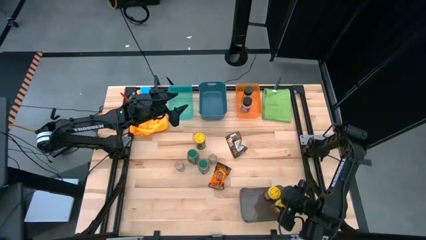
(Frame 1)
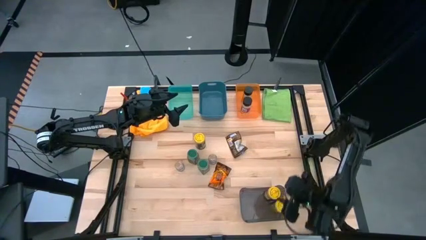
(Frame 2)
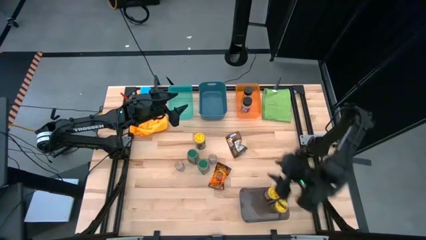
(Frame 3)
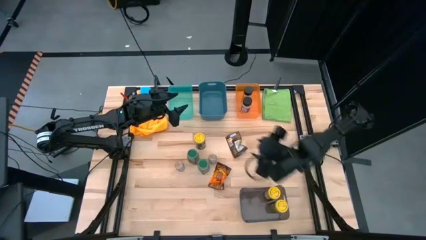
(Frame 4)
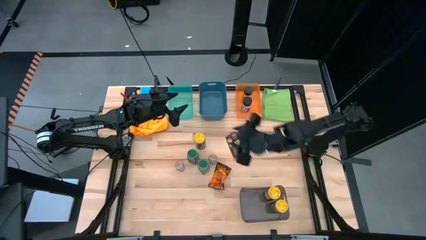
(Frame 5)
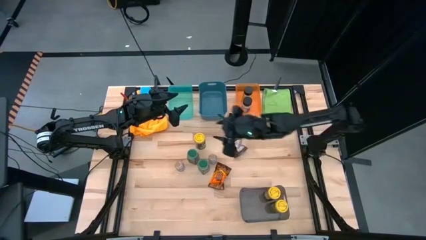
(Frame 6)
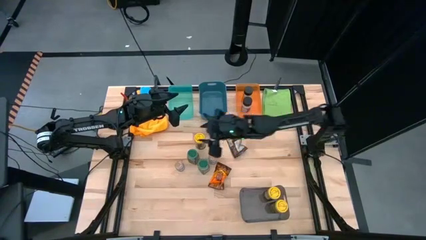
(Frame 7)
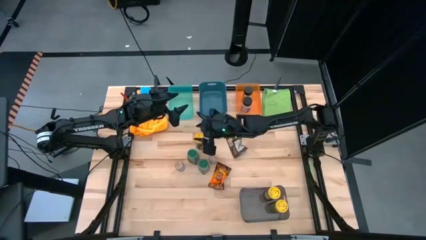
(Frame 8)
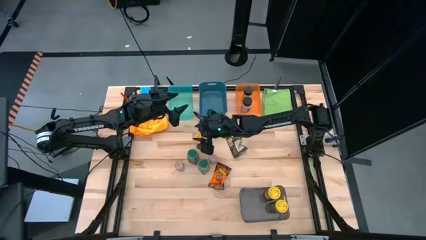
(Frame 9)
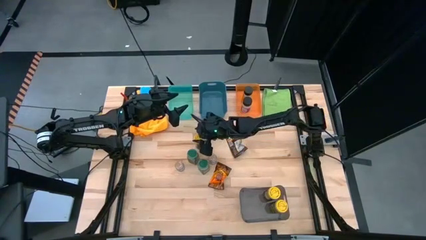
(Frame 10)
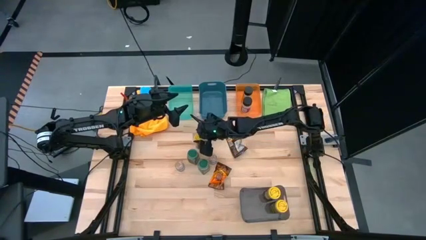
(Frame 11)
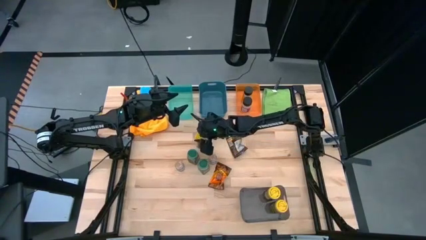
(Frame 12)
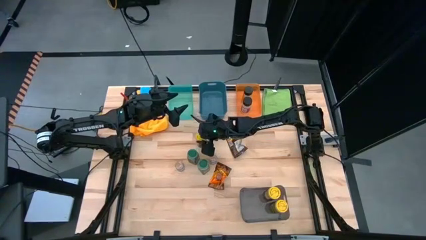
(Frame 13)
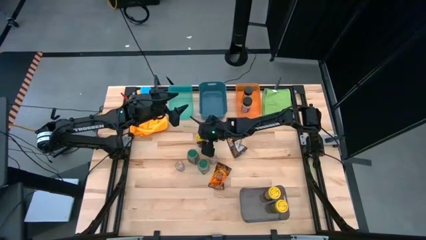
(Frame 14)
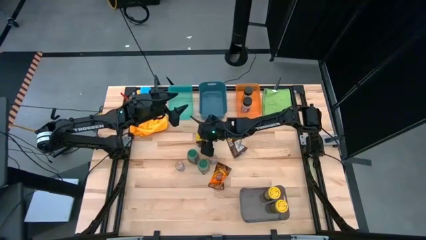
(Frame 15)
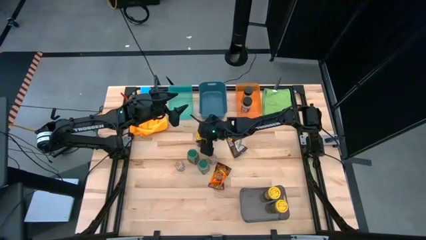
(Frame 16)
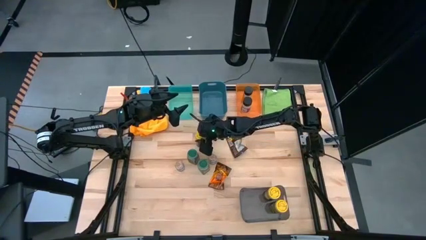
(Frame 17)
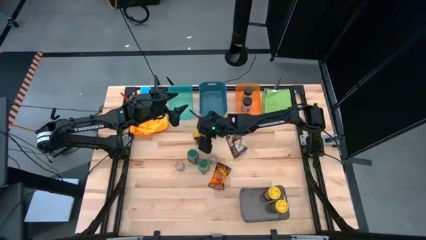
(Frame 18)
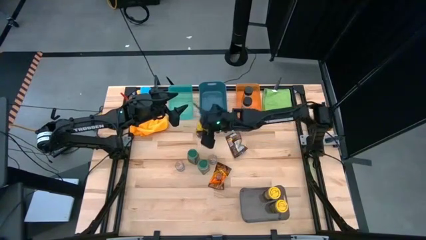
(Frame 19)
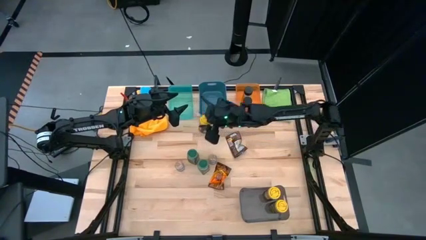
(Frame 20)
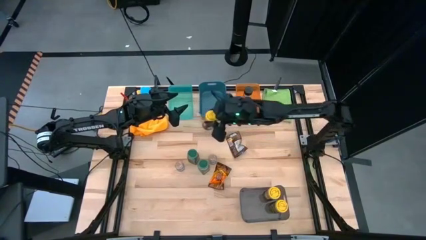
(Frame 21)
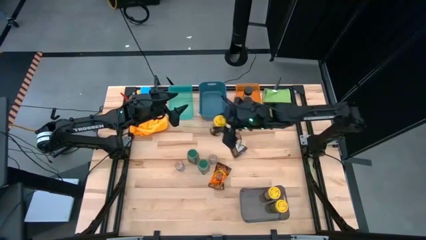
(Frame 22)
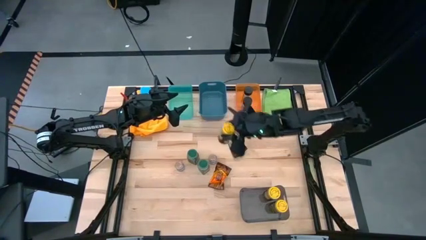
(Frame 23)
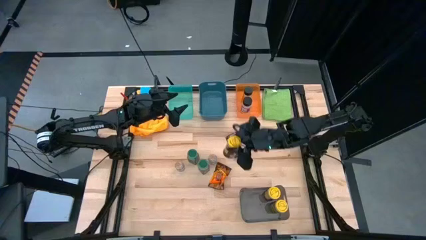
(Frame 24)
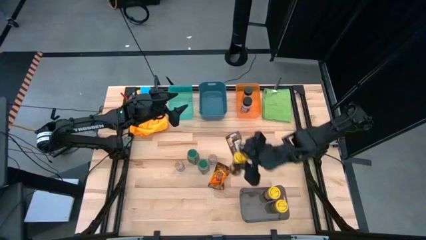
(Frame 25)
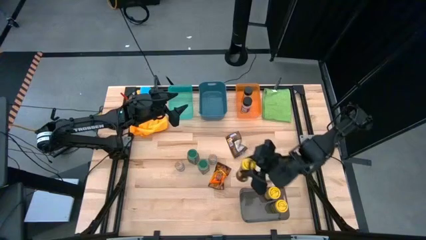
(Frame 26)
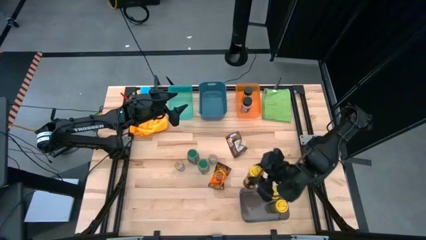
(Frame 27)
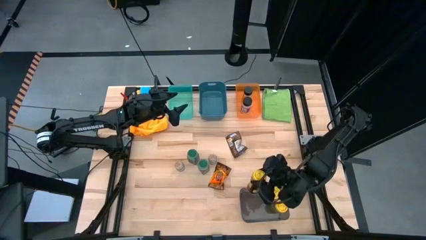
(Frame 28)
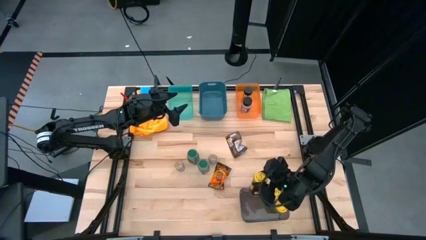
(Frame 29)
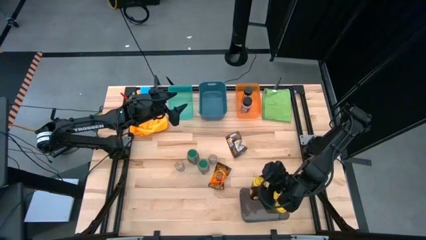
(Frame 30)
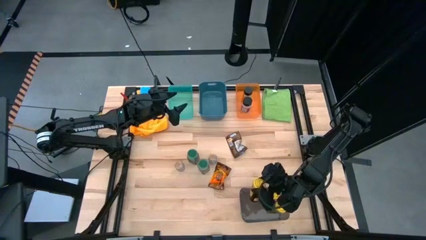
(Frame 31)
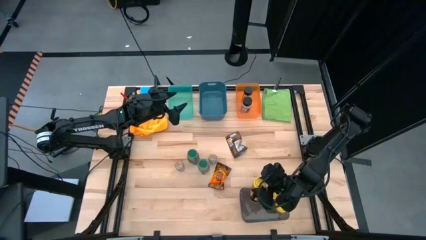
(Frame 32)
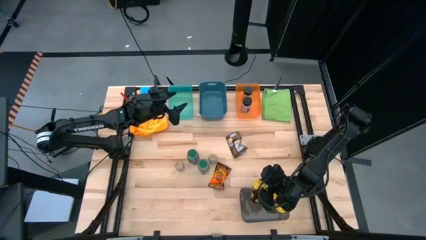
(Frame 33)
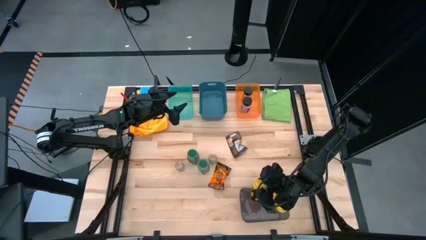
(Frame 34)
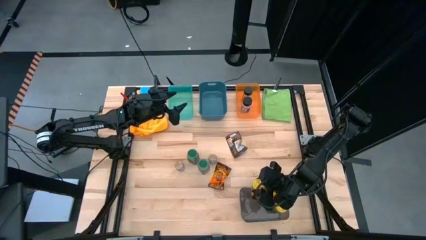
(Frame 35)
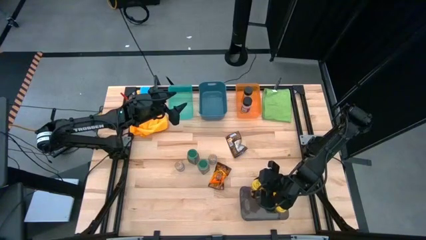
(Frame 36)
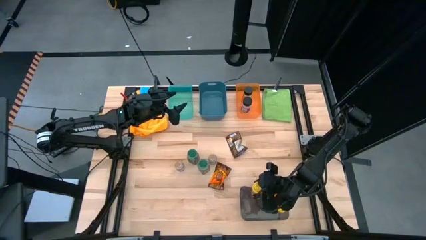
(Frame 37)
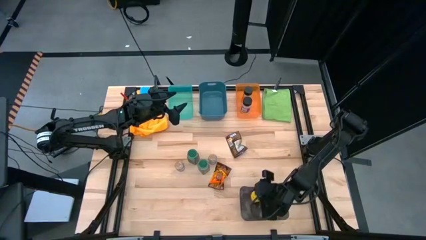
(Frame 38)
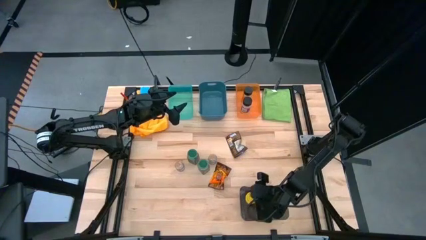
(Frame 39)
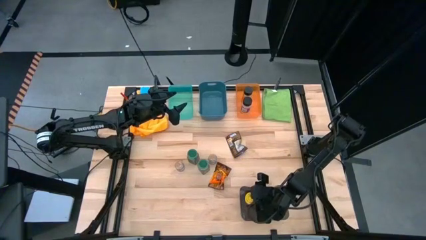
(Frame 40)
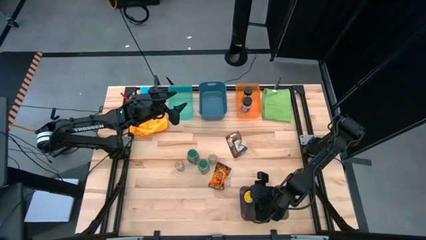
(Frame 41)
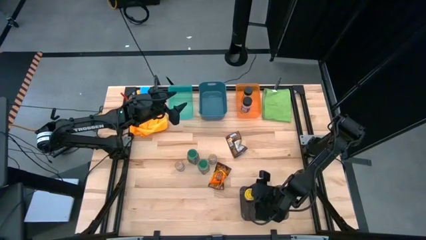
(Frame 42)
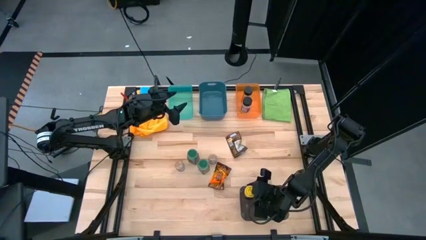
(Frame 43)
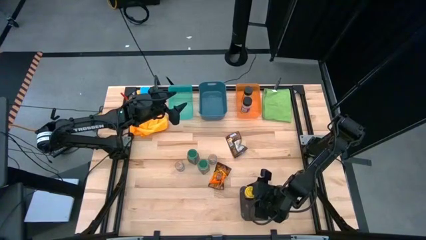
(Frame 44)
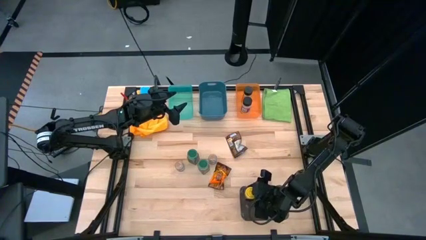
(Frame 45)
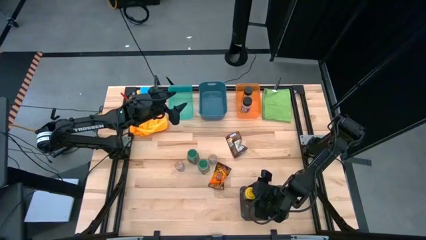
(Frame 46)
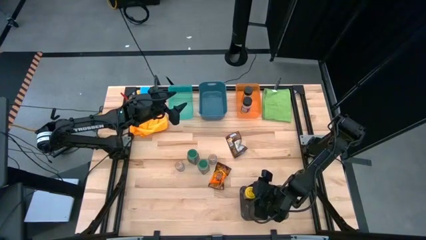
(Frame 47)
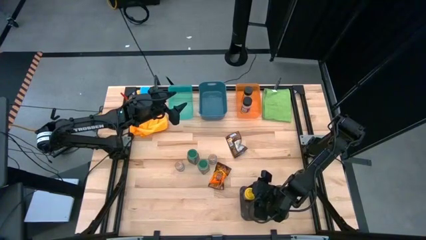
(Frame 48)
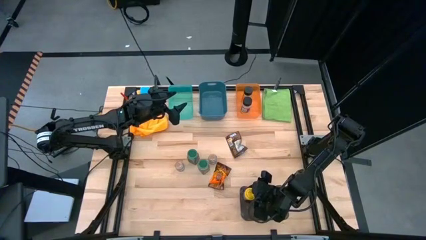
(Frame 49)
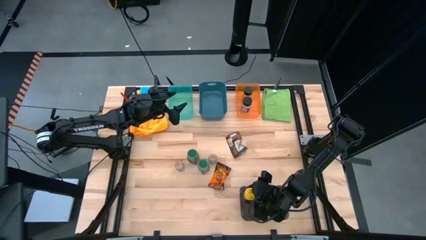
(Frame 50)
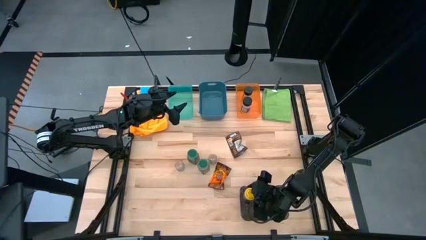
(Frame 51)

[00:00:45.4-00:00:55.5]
Task: Sort spices by type
Put the yellow seasoning can into the black bin

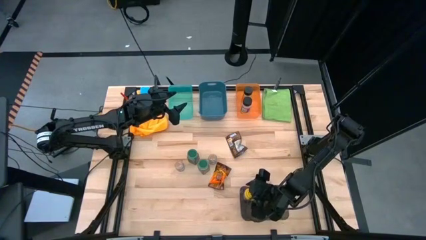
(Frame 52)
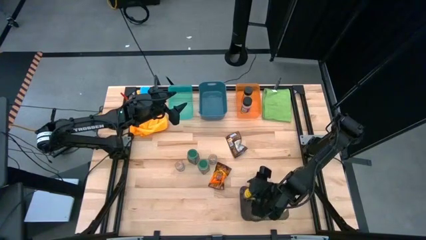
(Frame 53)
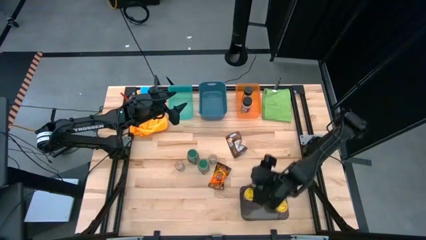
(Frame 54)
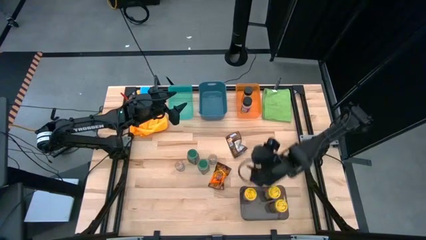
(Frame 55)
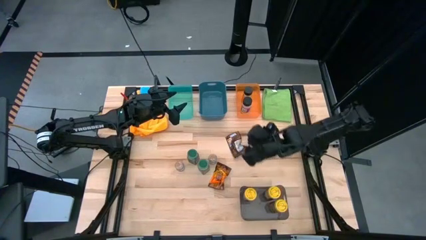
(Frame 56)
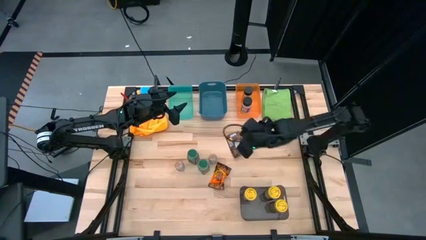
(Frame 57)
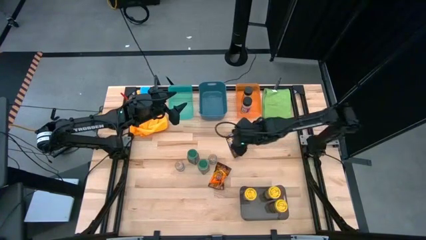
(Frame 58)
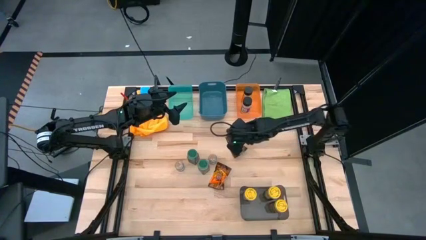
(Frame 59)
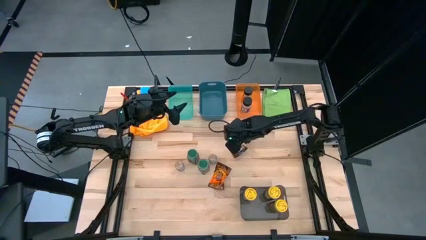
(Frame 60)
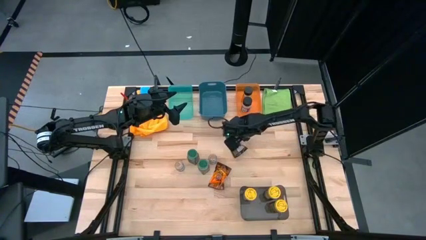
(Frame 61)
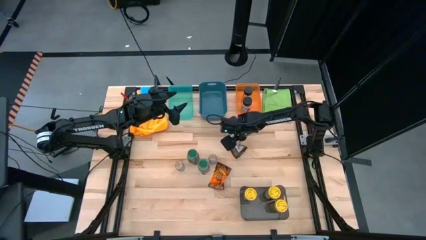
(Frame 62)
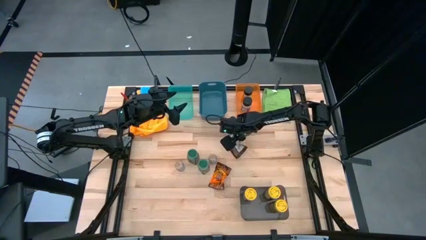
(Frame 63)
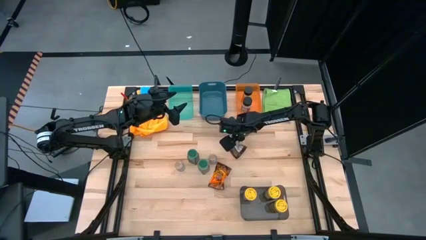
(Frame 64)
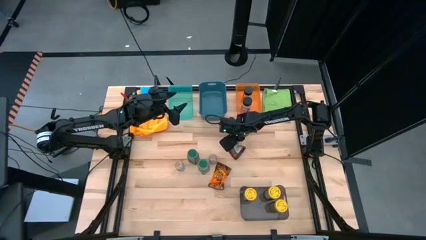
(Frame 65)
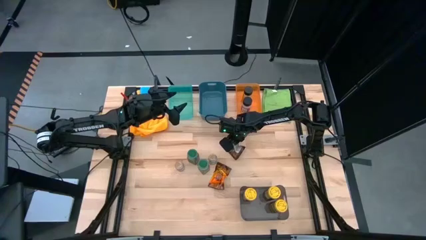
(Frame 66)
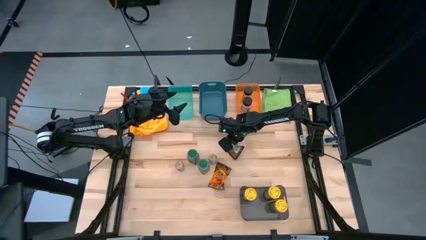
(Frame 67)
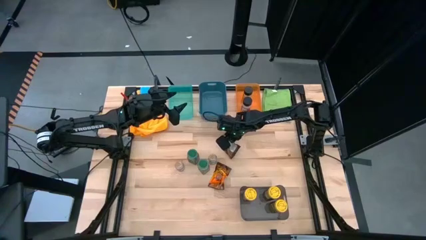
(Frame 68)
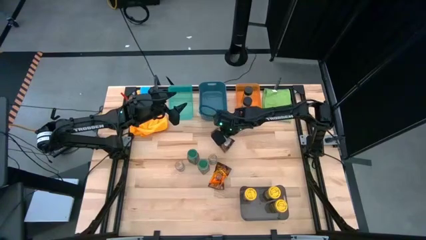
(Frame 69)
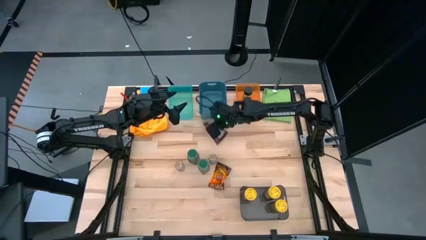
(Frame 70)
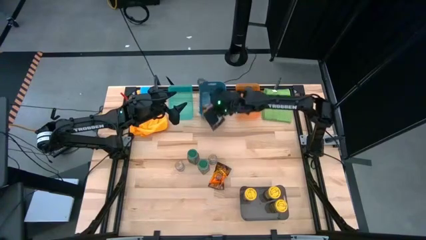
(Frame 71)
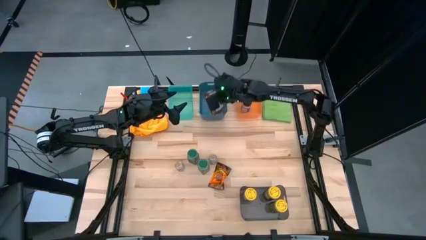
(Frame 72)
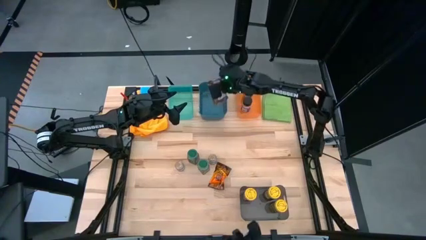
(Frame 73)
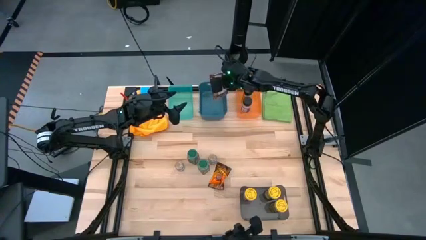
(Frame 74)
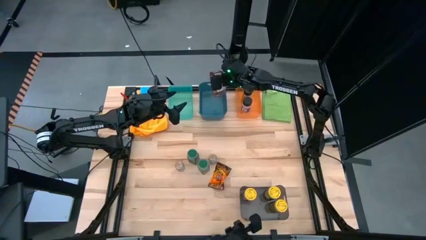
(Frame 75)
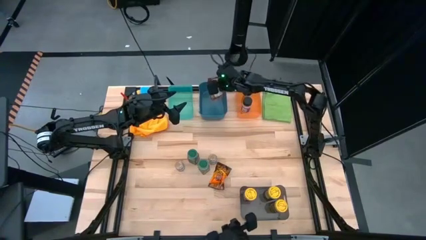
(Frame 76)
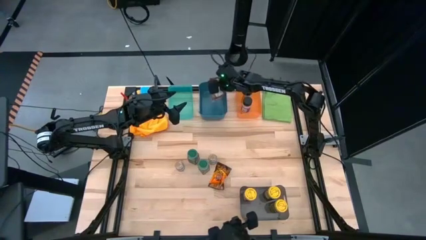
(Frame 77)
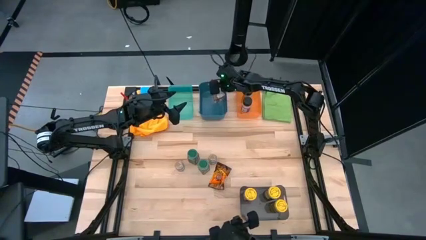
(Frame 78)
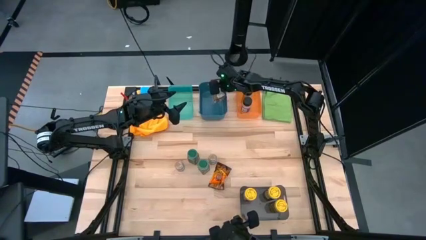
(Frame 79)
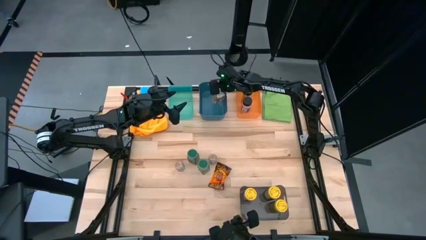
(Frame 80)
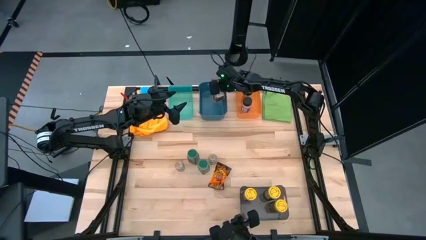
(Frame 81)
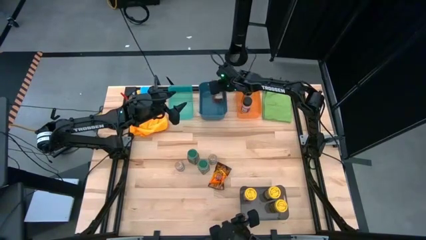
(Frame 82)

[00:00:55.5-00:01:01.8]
Put the top brown seasoning pack into the blue bin

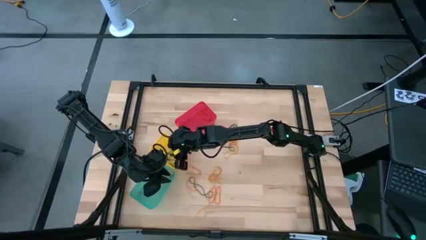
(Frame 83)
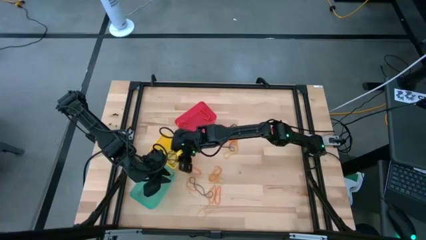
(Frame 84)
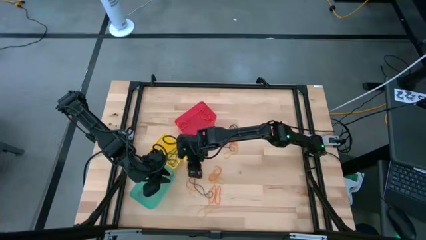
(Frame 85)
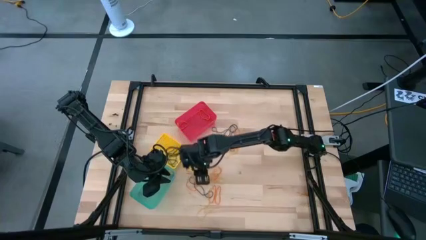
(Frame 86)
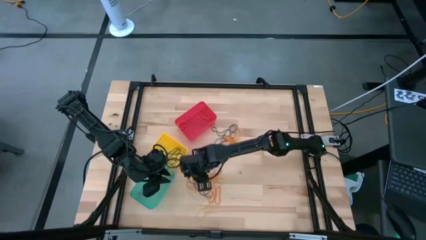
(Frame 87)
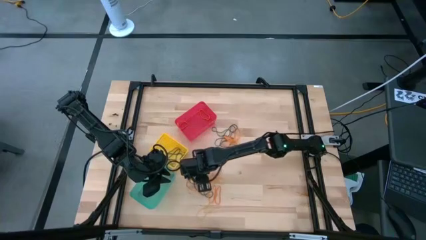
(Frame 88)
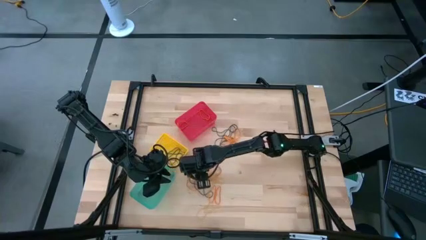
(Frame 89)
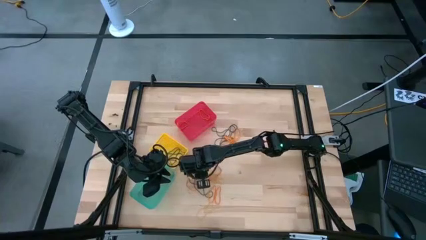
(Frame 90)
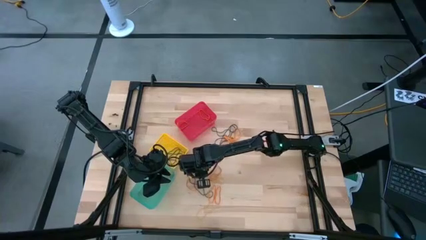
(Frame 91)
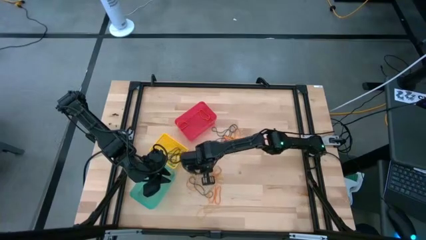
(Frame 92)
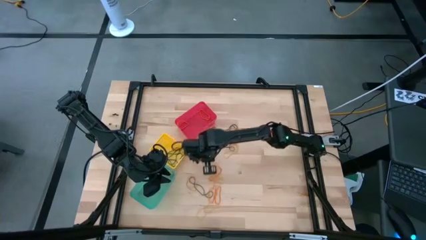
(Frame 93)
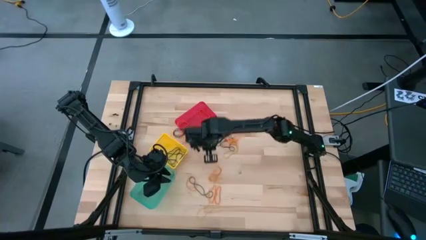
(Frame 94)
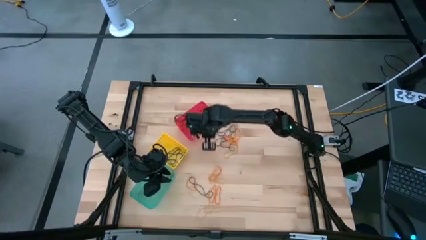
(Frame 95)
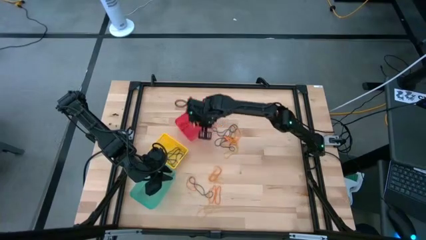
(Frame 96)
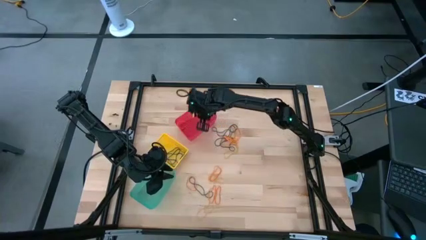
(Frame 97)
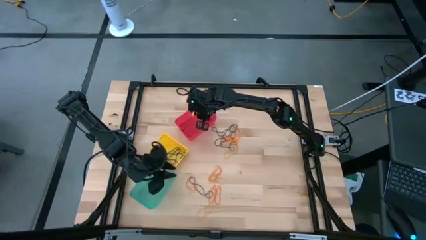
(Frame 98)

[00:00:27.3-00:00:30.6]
Task: Sort rubber bands into baskets
Put the orange rubber band into the red bin
